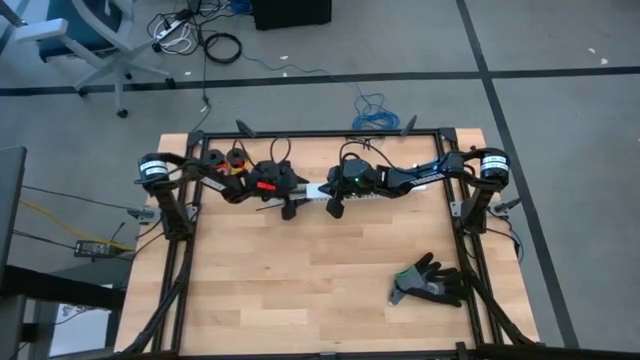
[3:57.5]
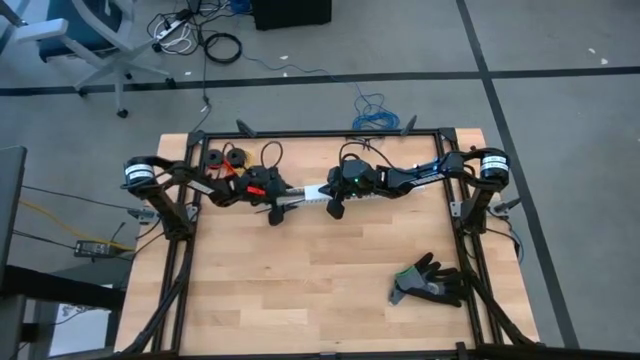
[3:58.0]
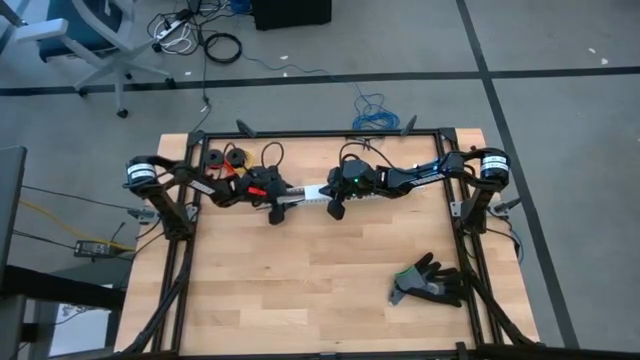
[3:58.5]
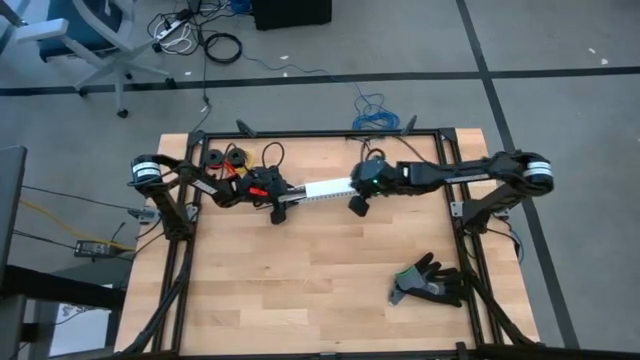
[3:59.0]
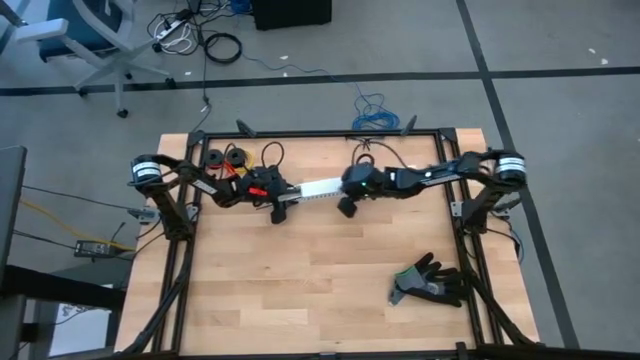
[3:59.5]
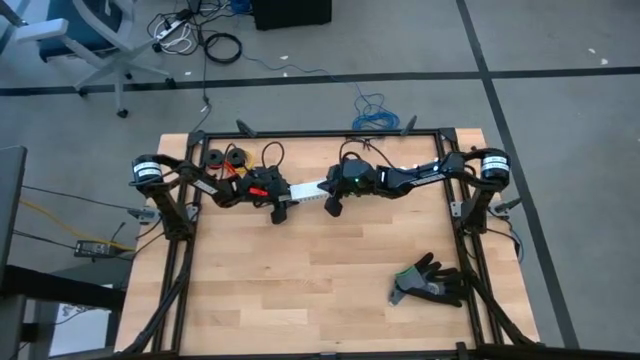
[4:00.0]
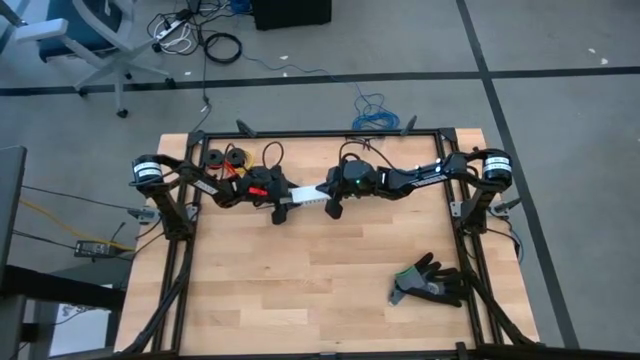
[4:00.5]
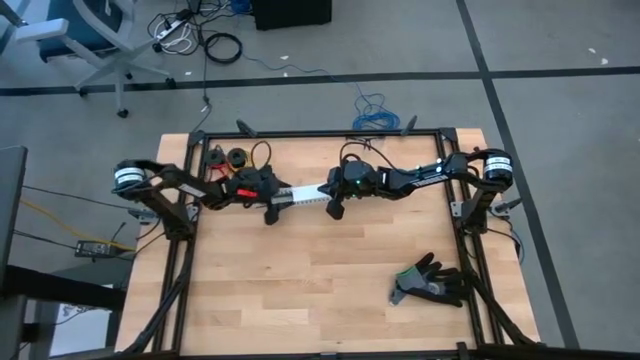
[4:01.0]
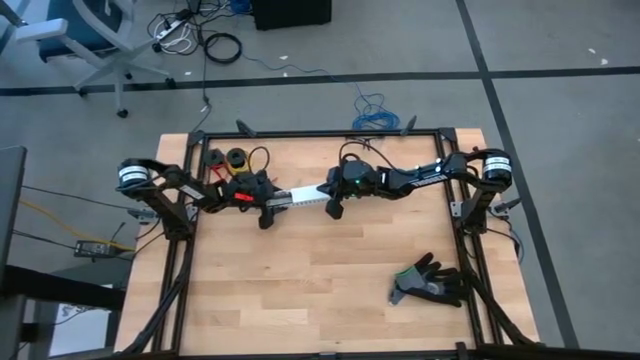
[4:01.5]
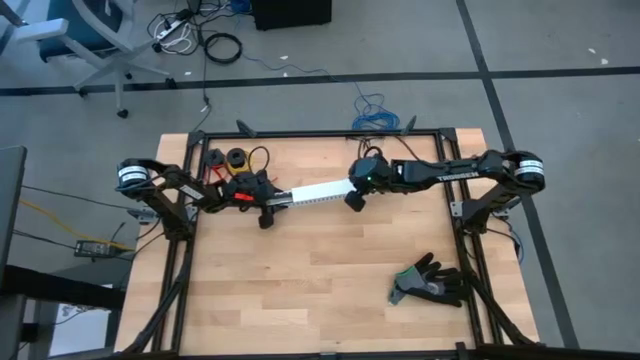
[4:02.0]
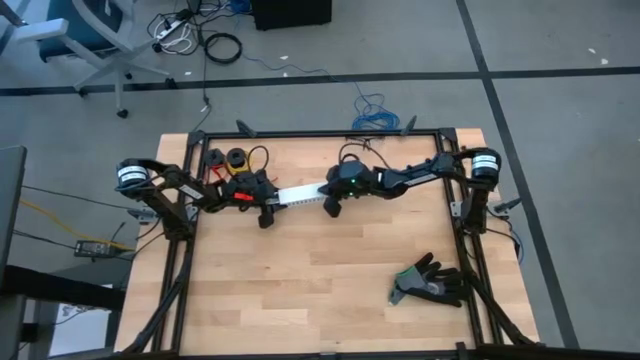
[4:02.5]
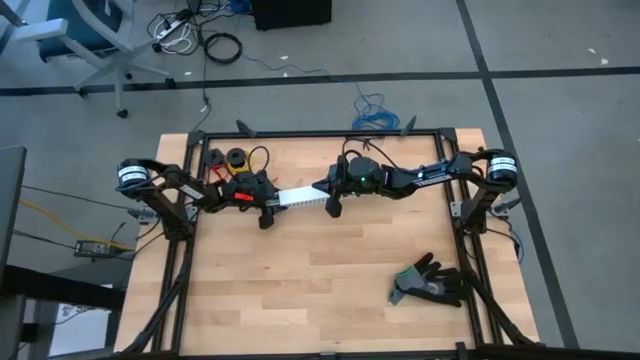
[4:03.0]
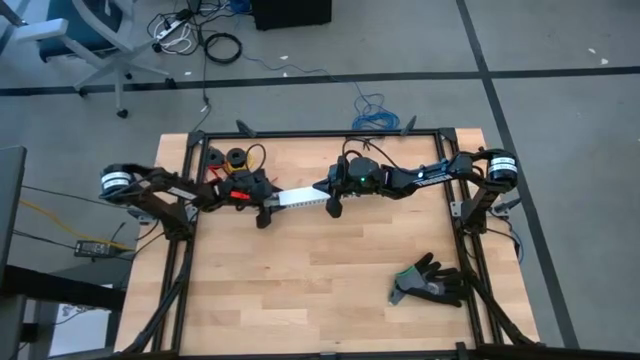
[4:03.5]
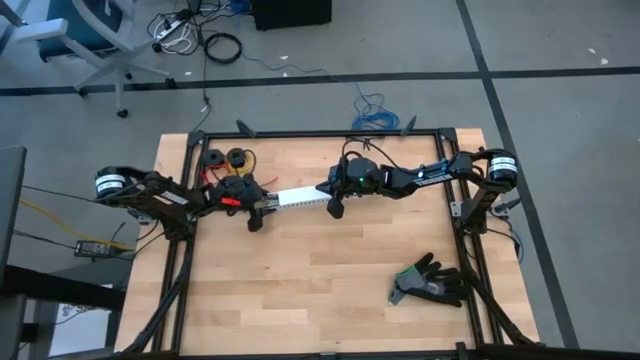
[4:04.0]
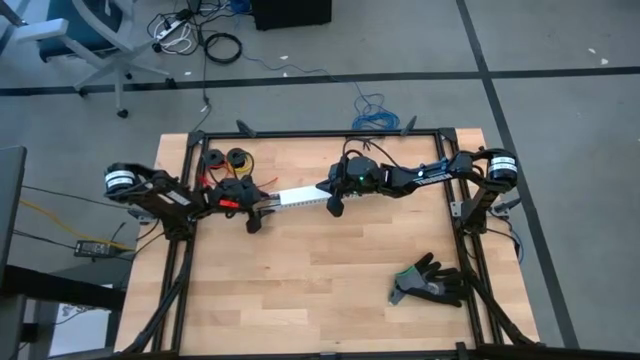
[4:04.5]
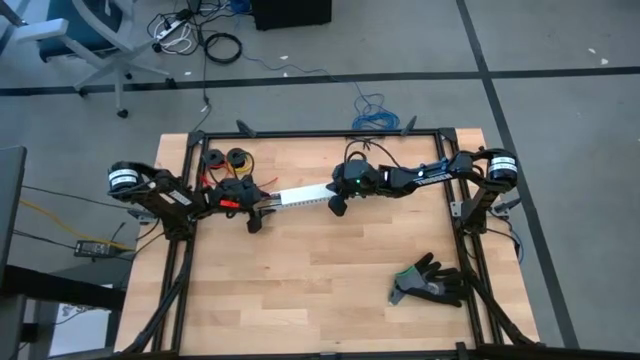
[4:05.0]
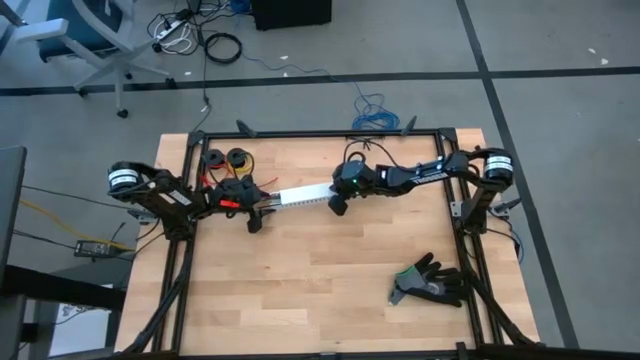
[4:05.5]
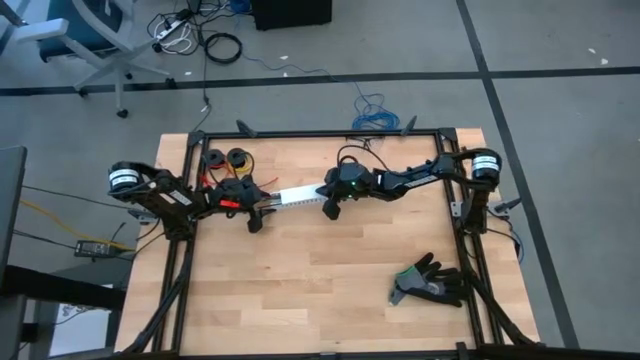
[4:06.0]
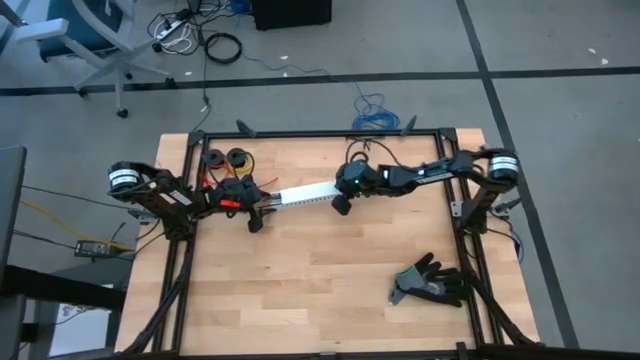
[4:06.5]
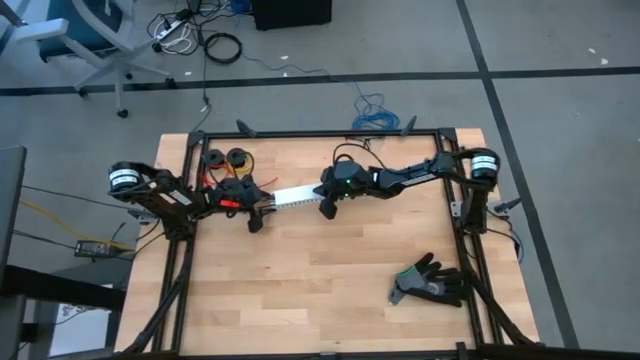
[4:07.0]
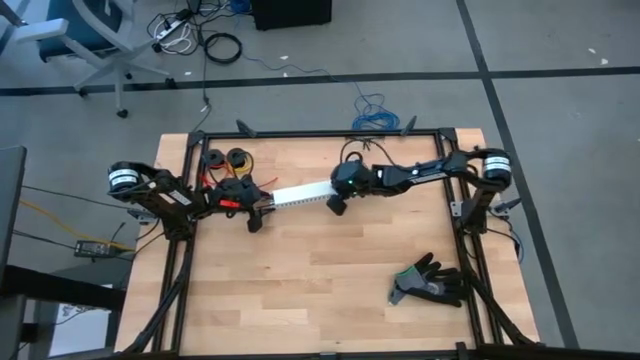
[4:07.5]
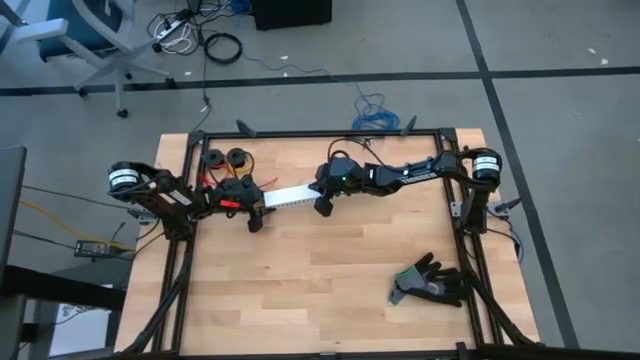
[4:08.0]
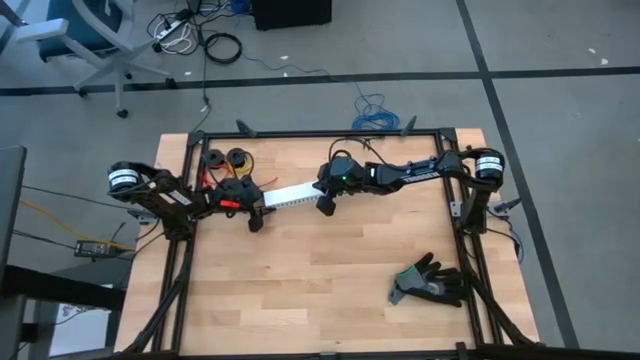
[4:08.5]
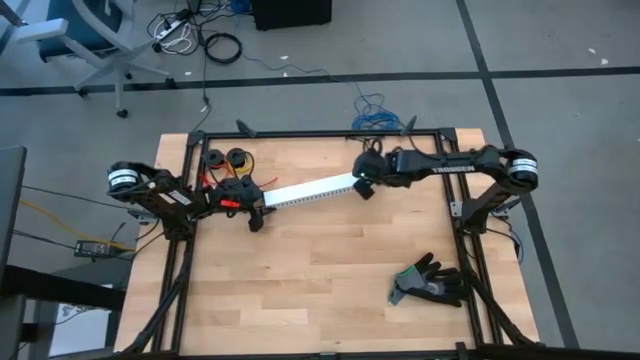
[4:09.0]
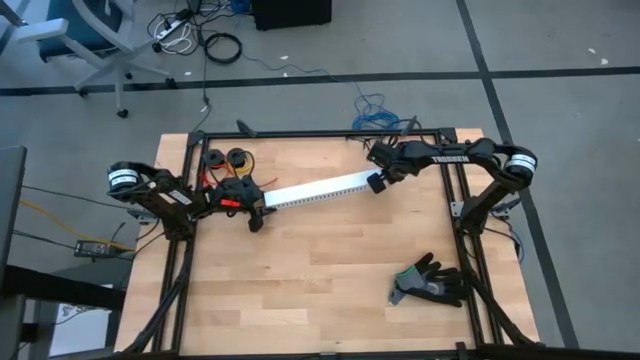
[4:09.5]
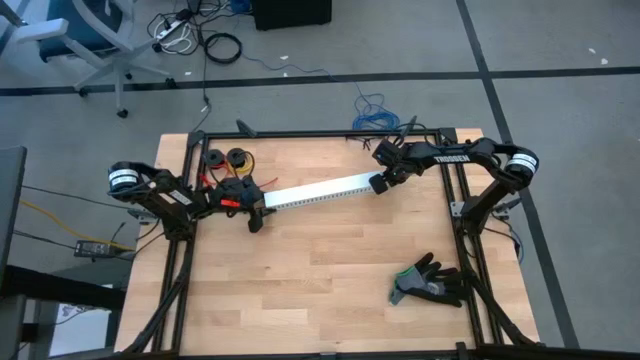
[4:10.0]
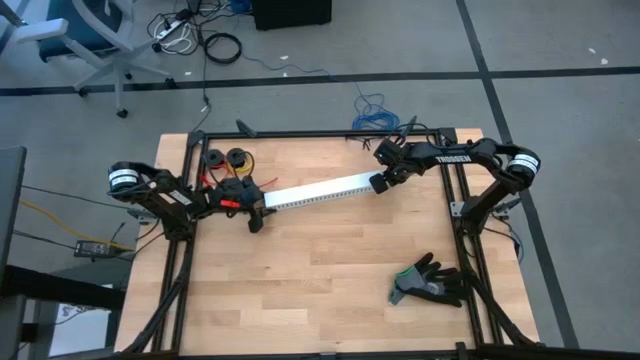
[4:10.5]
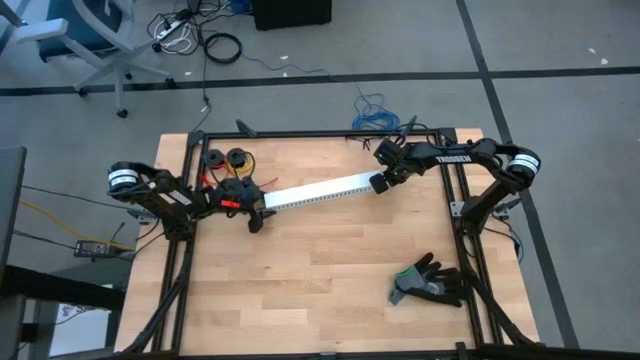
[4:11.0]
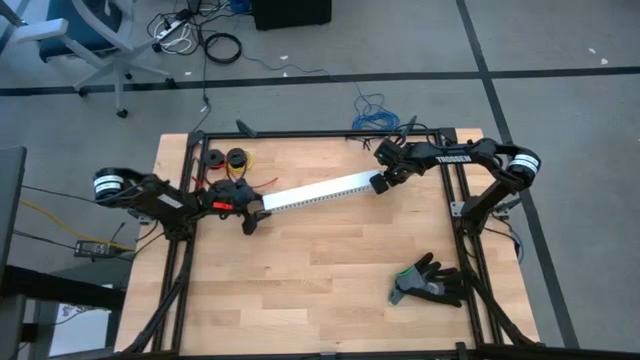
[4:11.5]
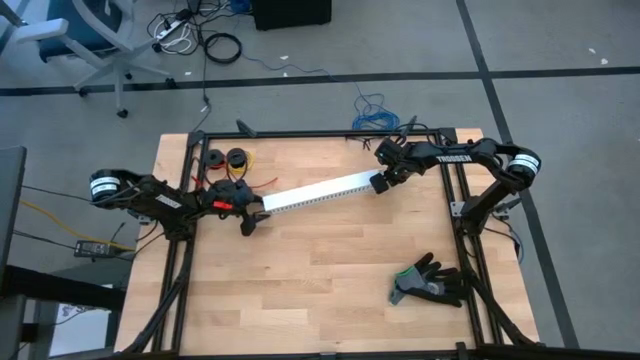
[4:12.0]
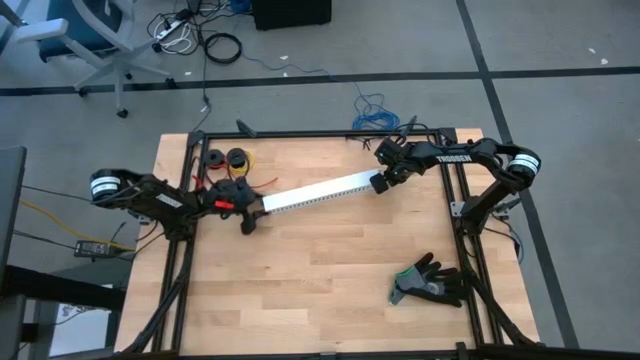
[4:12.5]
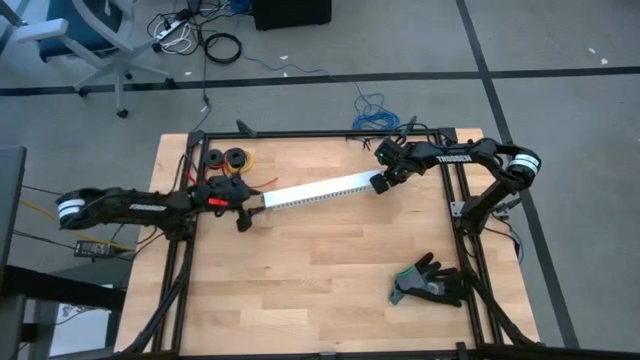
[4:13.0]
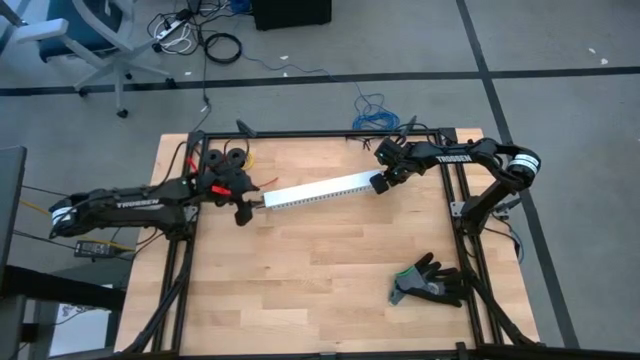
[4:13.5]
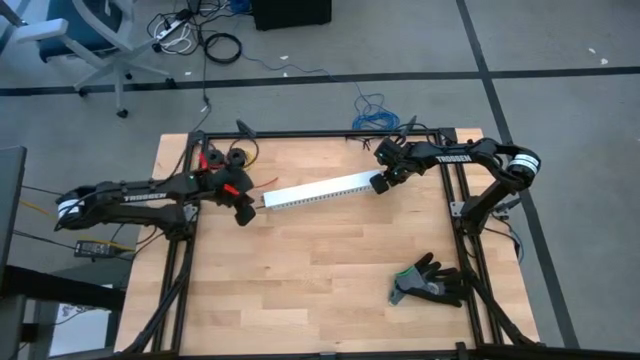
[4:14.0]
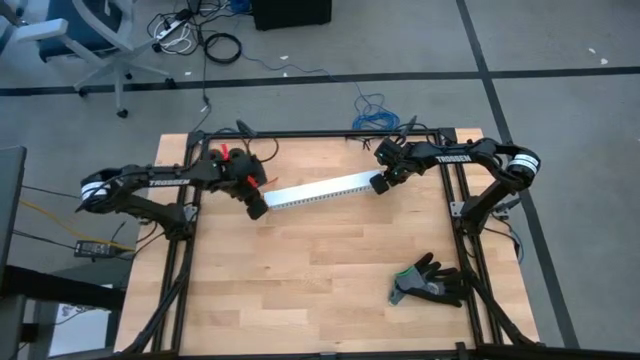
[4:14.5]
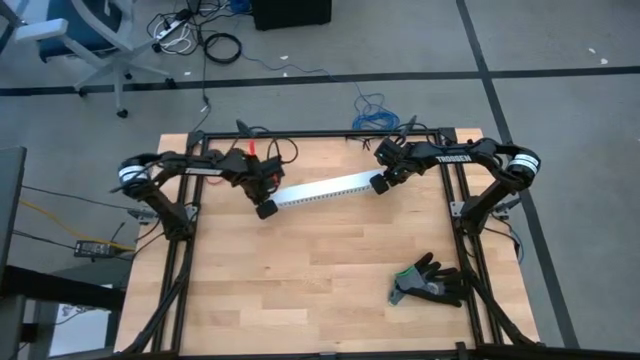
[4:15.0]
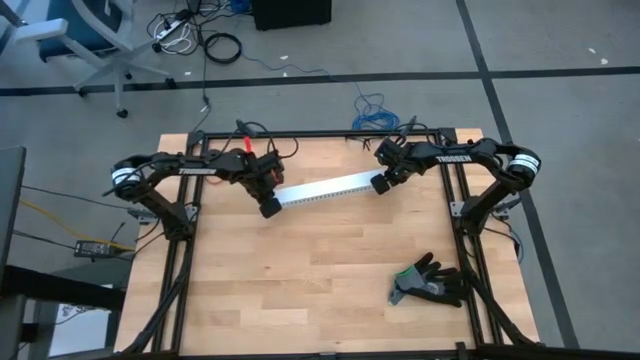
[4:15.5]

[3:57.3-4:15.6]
Task: Ziptie cables
Close the white cable duct

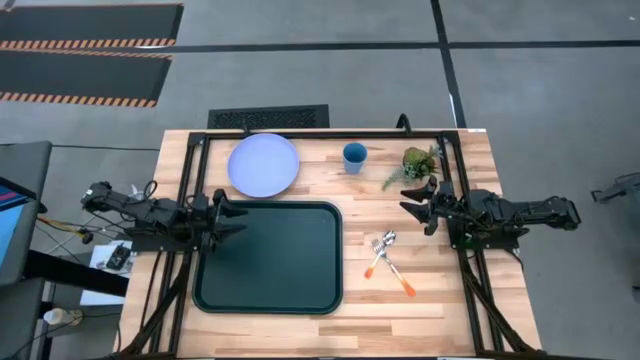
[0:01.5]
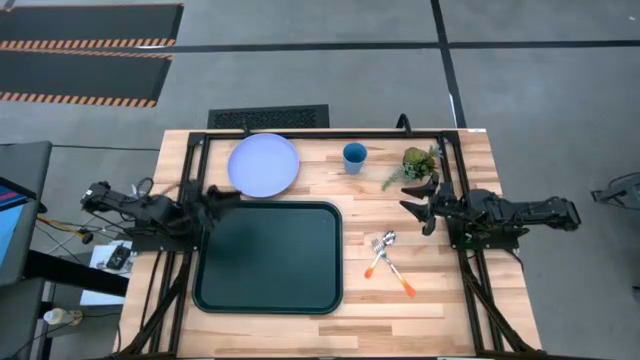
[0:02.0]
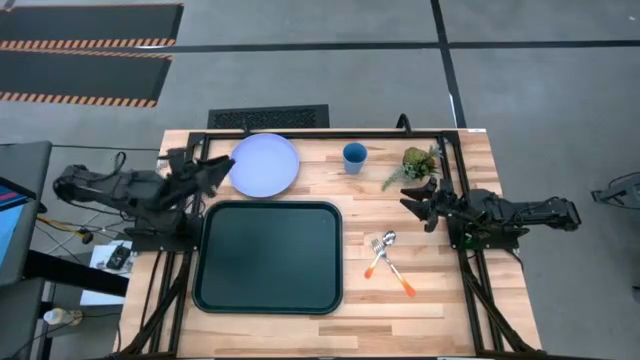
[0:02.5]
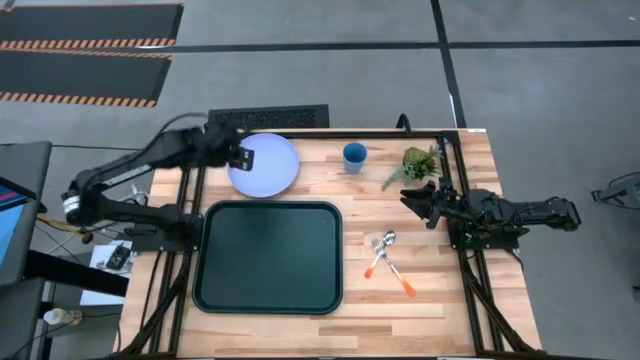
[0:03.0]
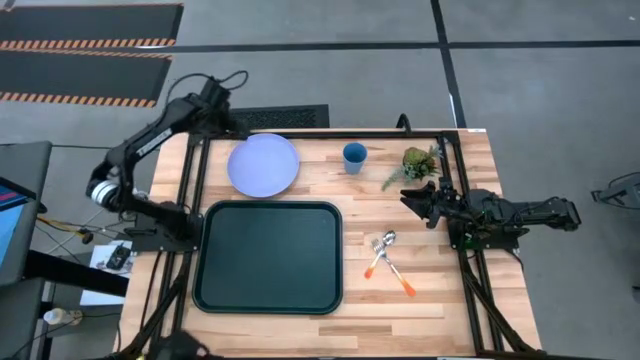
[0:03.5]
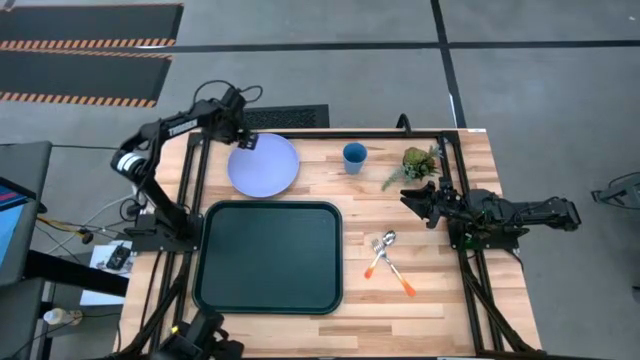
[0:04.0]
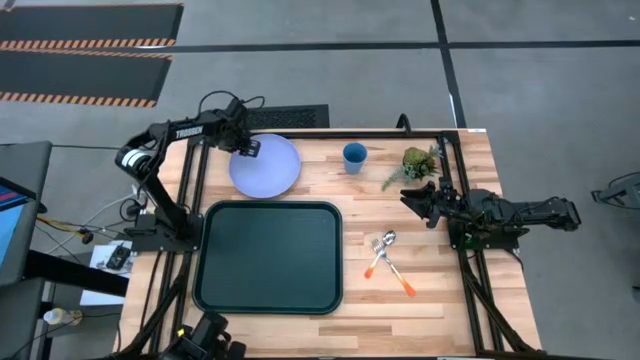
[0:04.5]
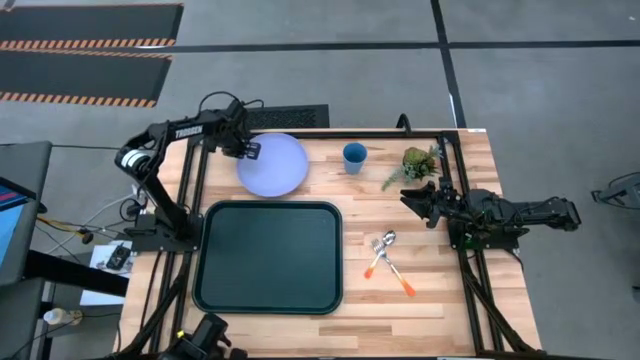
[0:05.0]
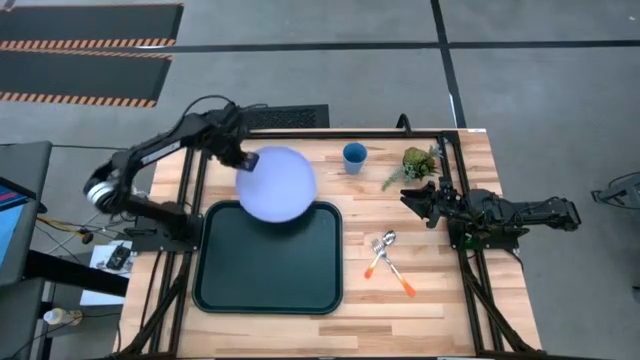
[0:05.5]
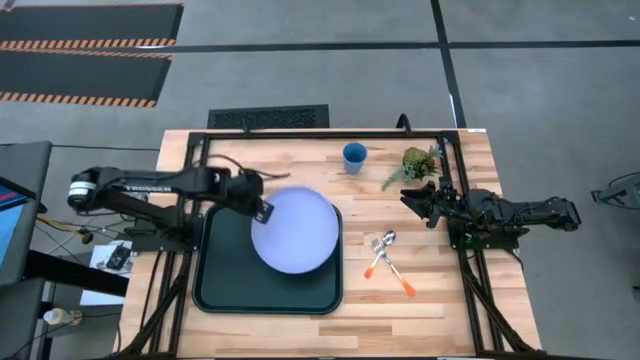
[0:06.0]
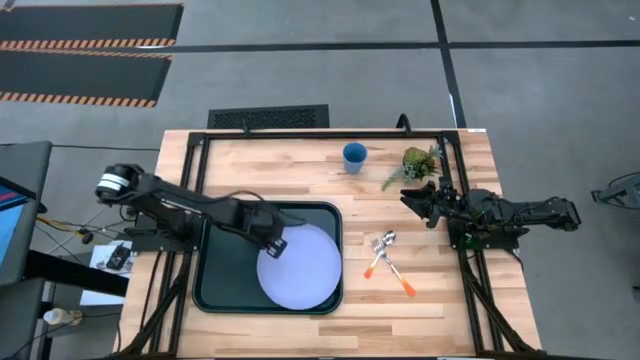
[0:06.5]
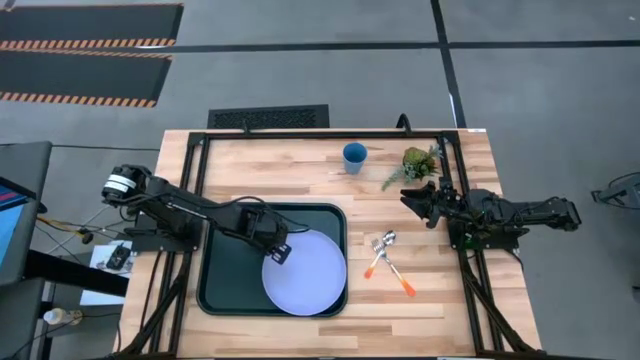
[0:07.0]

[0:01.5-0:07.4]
Task: Pick and place plate/cup/fork/spoon on tray
Put the purple plate on the black tray
